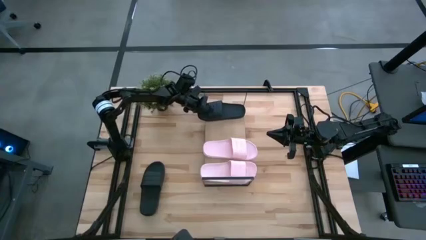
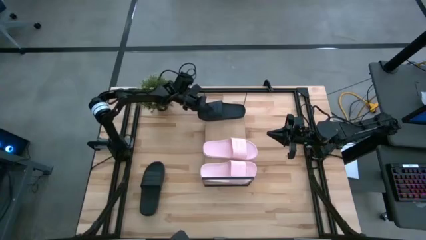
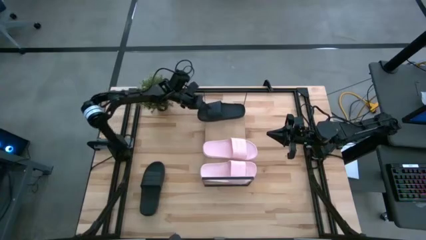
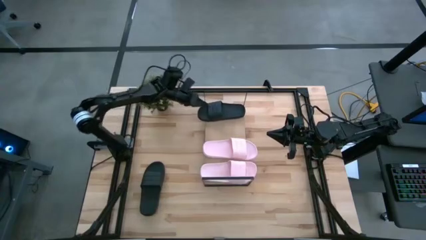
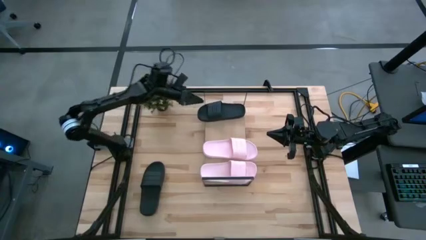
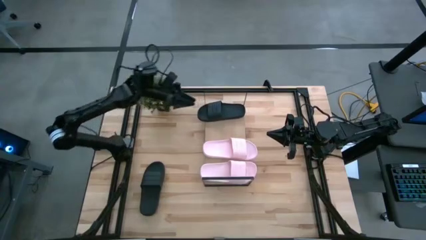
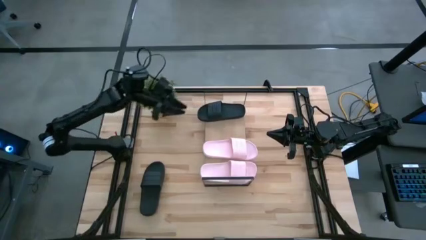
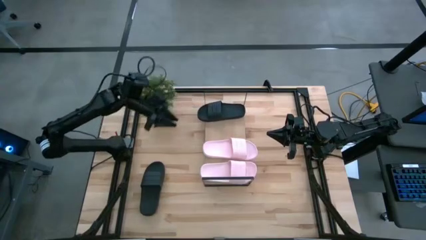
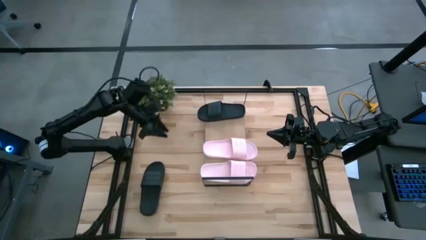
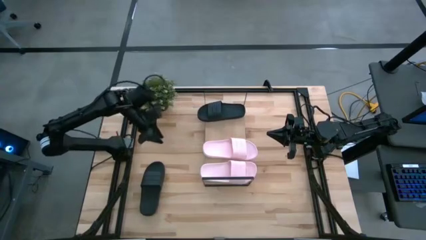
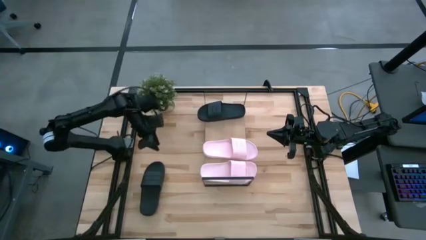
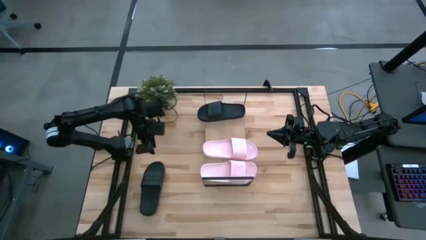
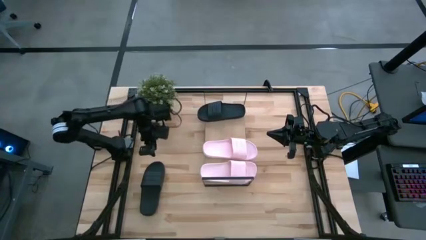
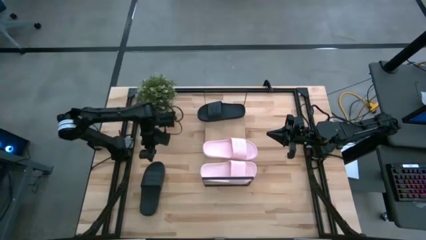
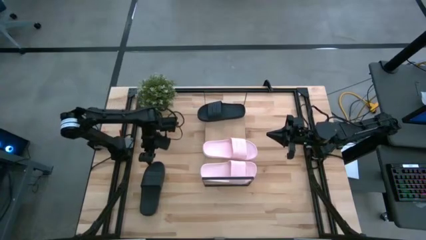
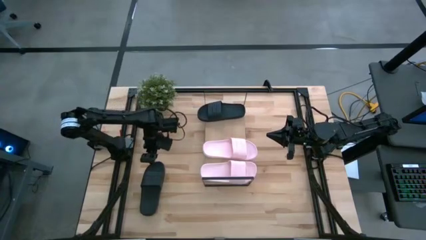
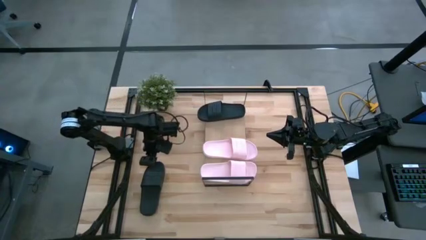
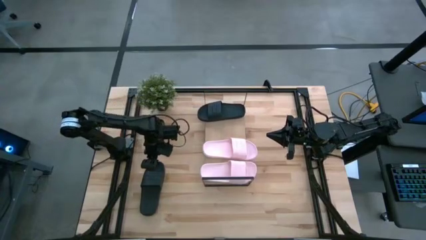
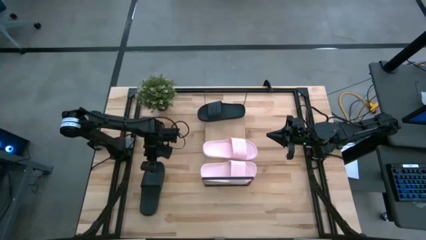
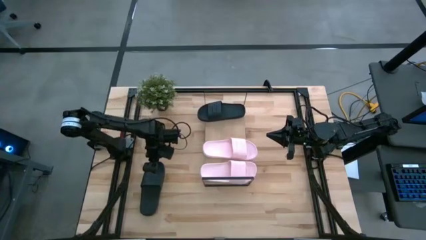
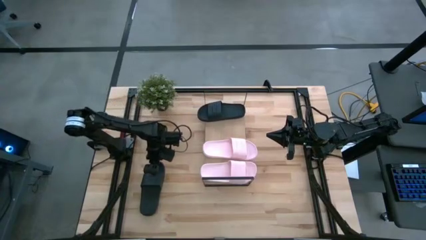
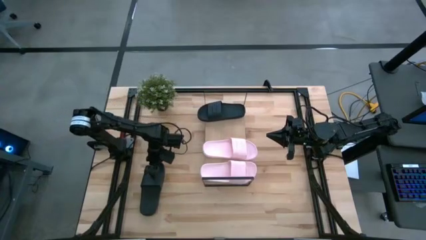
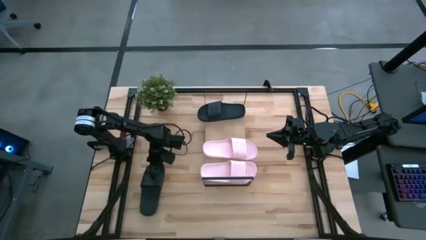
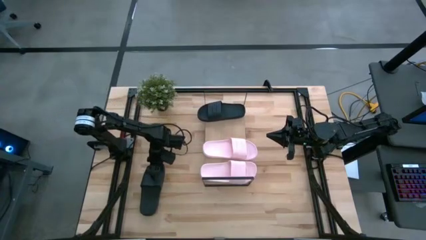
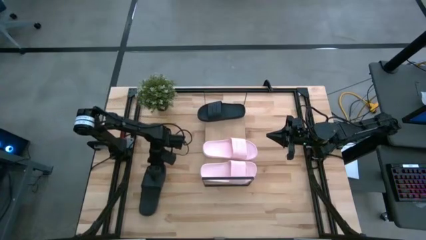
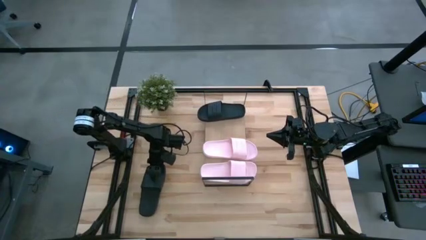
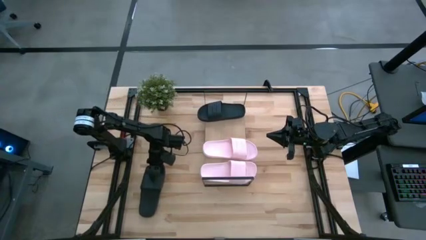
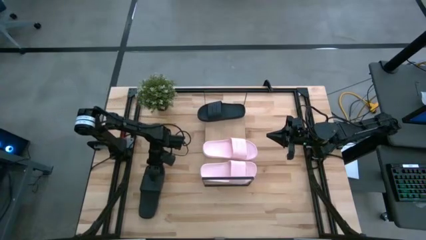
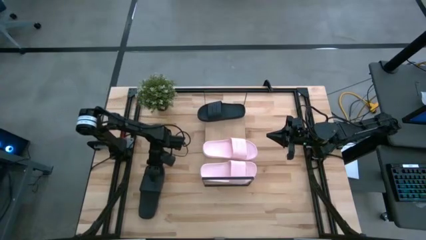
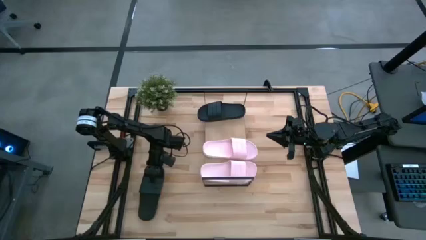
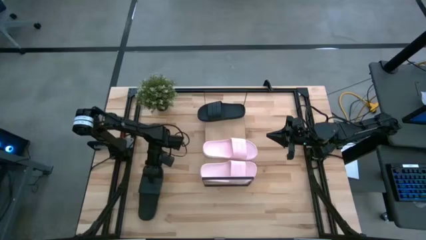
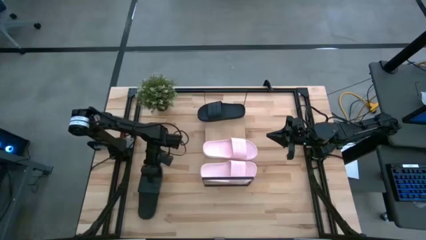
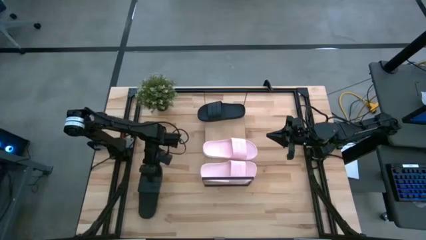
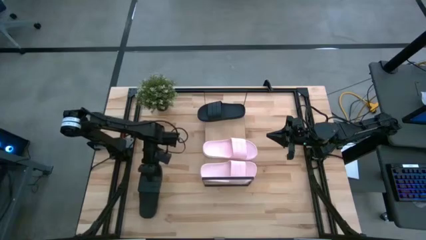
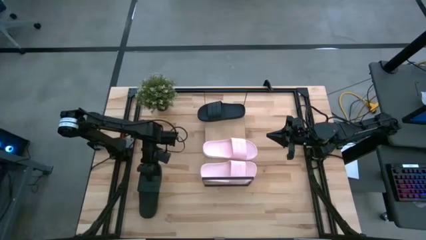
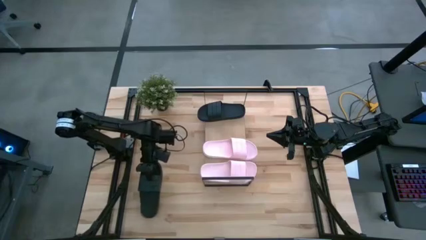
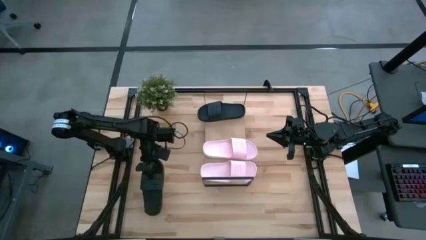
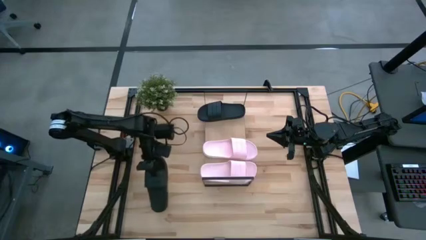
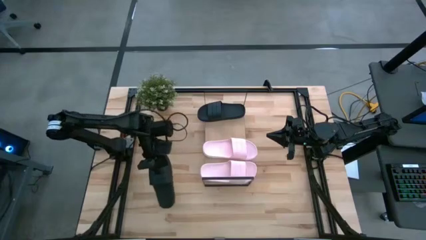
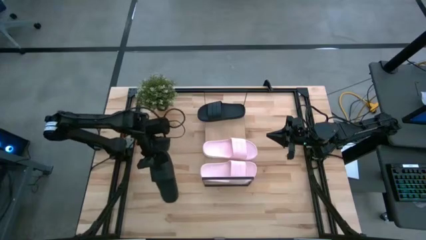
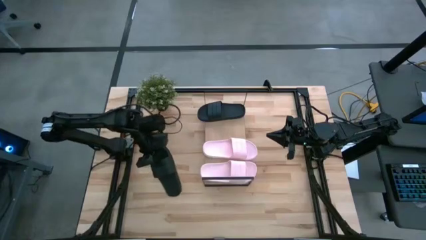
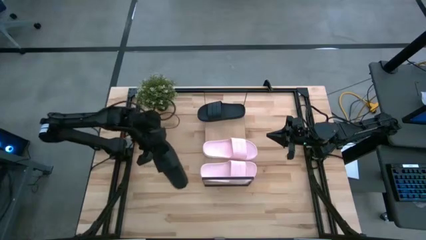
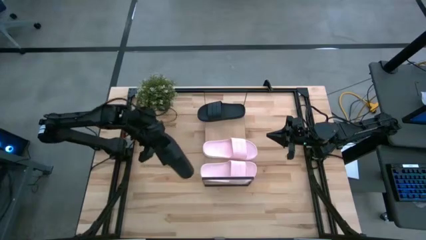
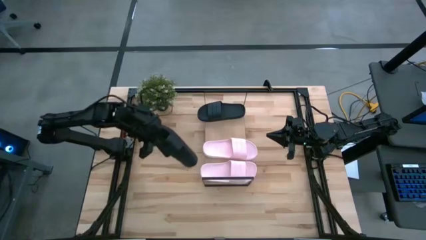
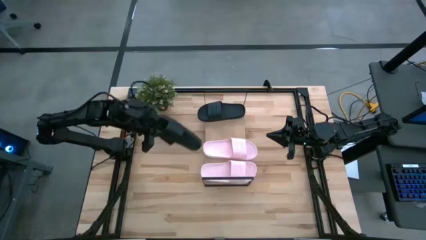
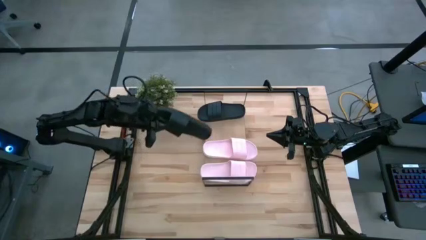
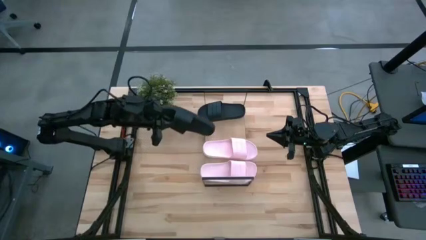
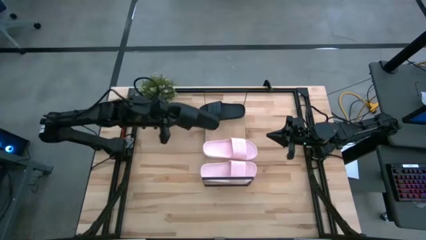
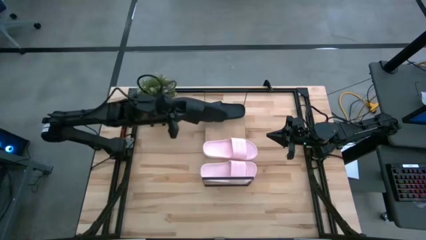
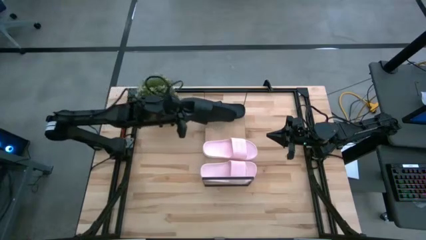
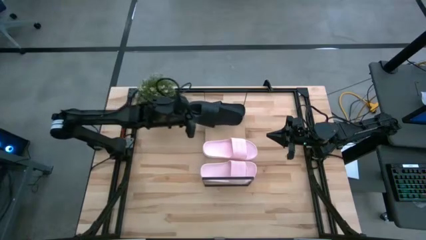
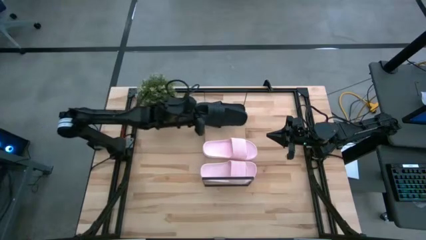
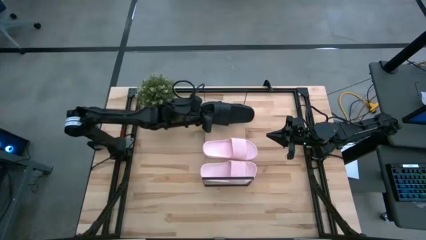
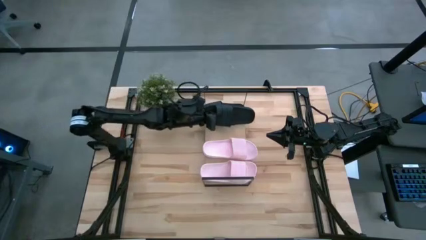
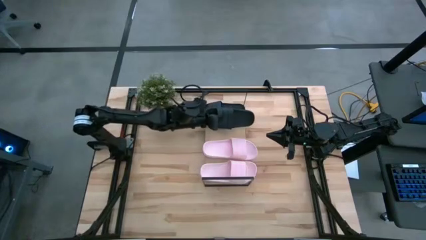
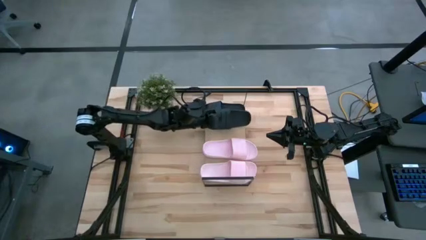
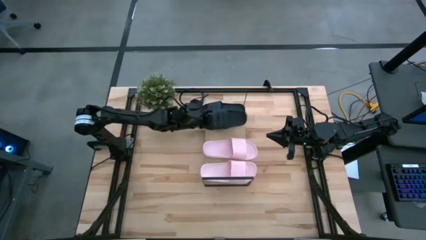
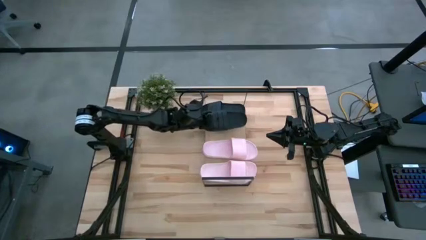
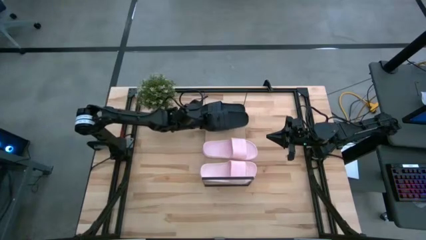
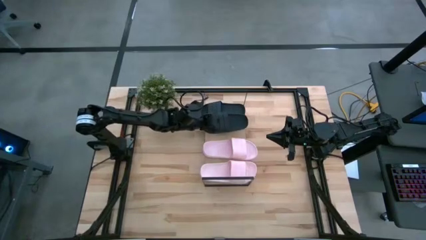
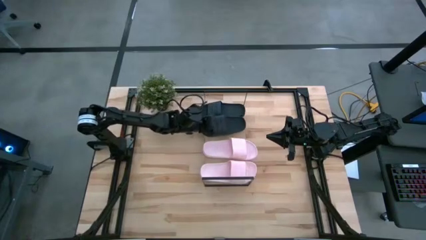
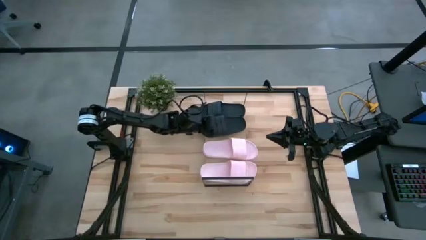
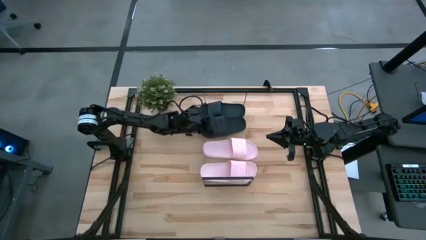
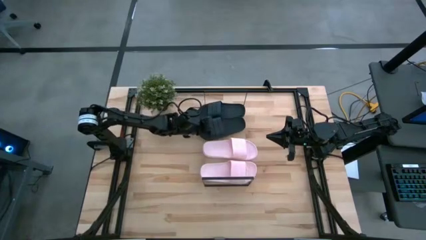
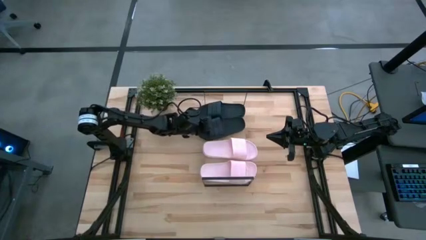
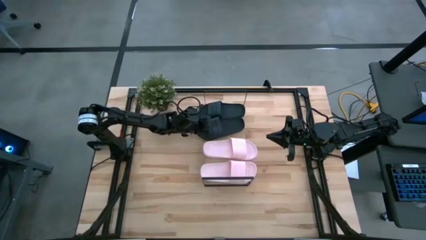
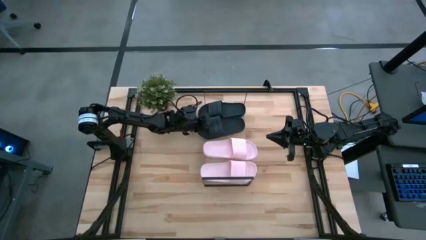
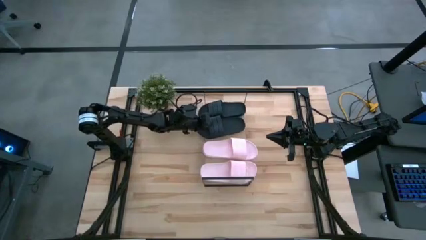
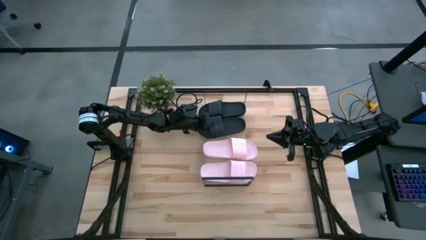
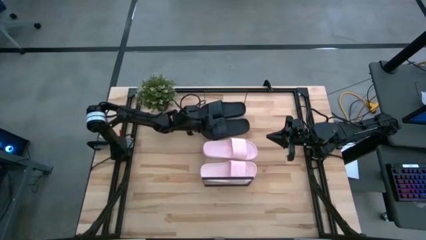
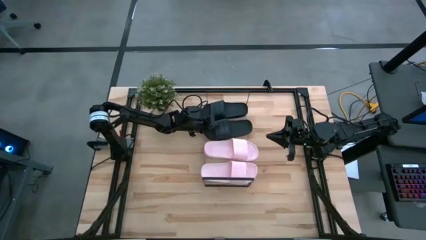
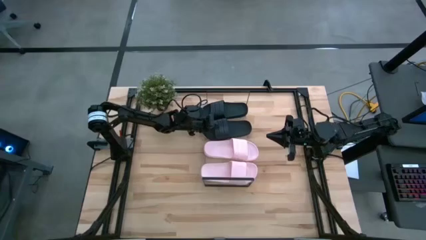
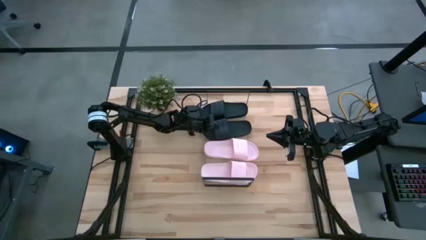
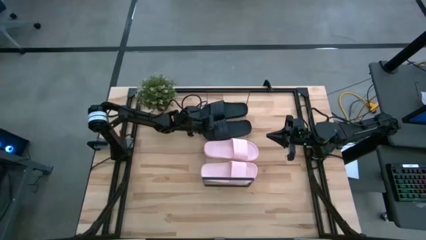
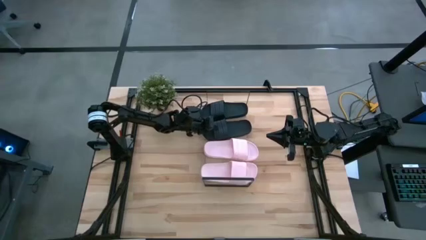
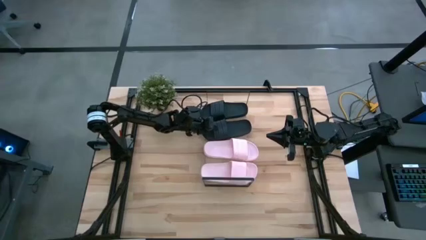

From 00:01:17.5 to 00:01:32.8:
Task: Pick and place slides into the shelf
Put the black slide on the shelf

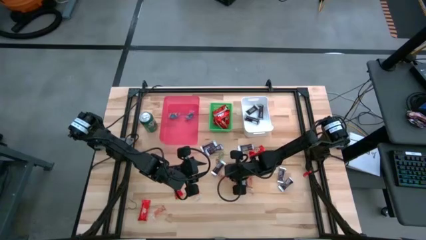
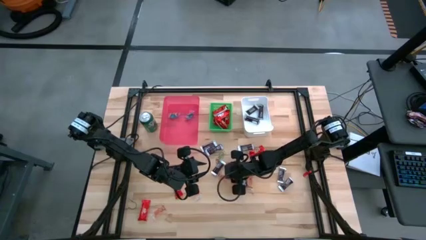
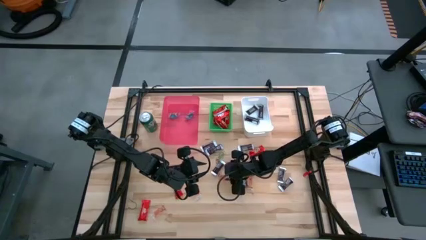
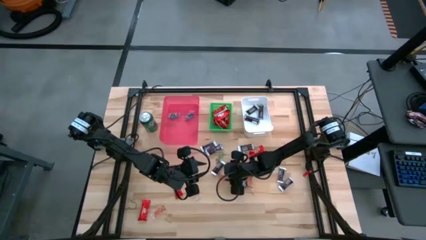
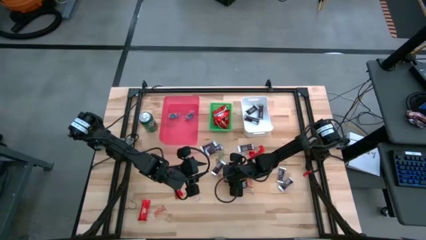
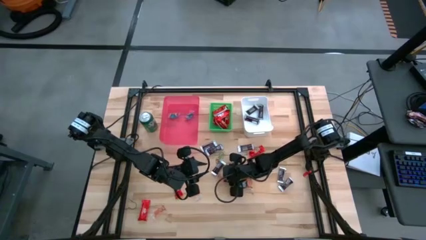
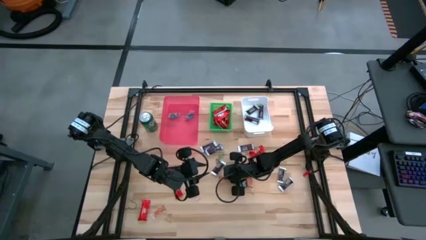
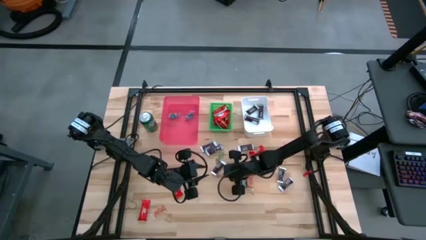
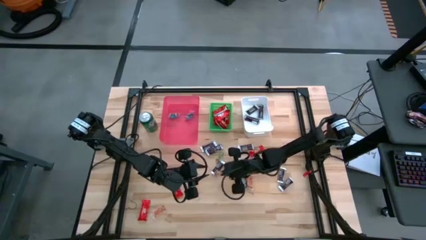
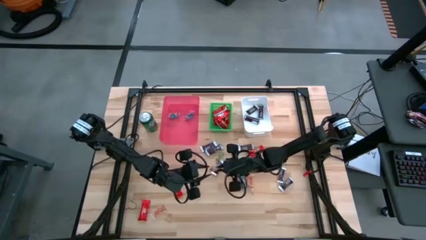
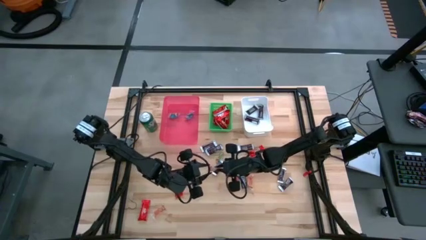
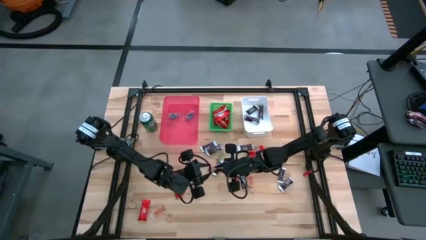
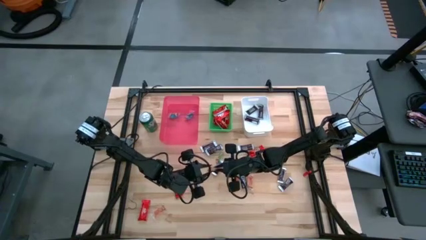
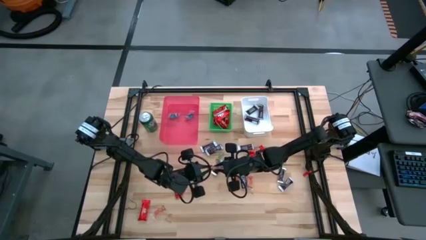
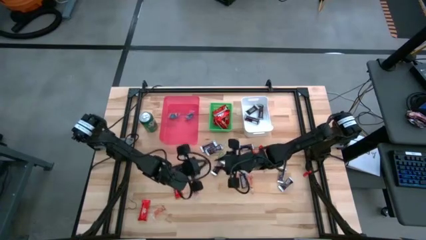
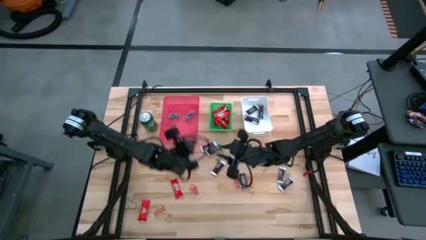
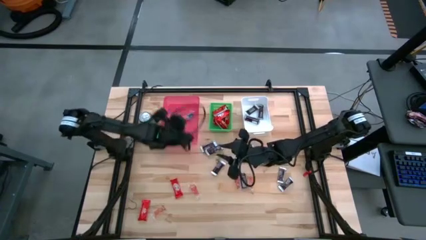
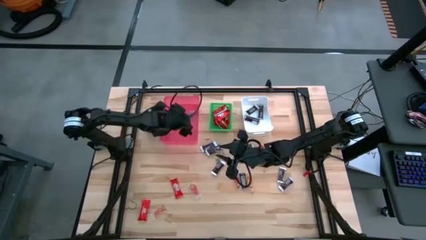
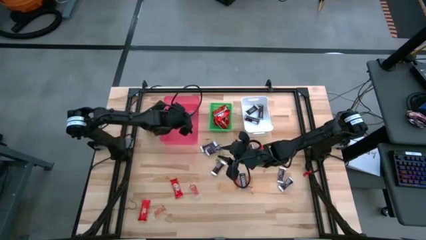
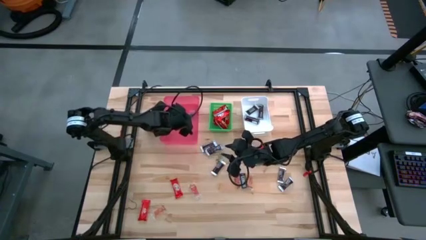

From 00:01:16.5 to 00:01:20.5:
Task: Sort candy
Put the orange gummy into the red bin
